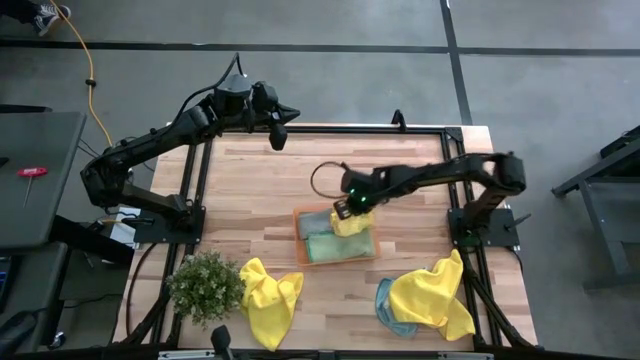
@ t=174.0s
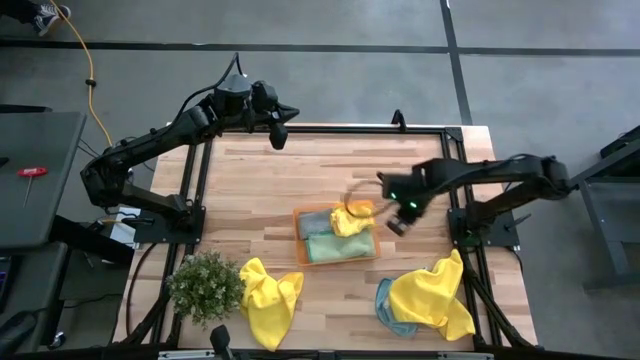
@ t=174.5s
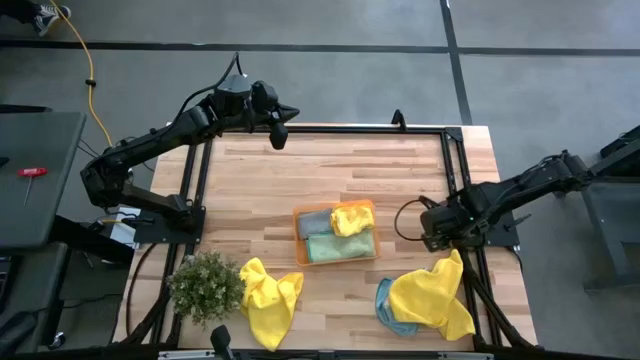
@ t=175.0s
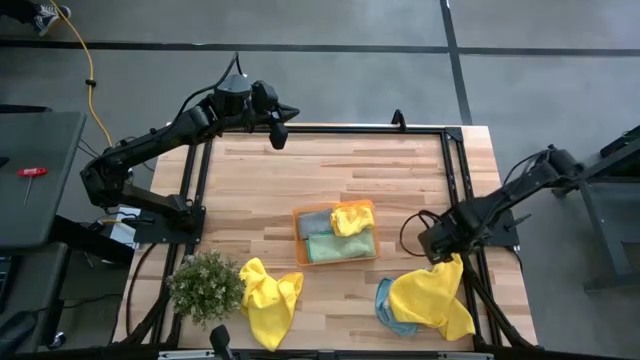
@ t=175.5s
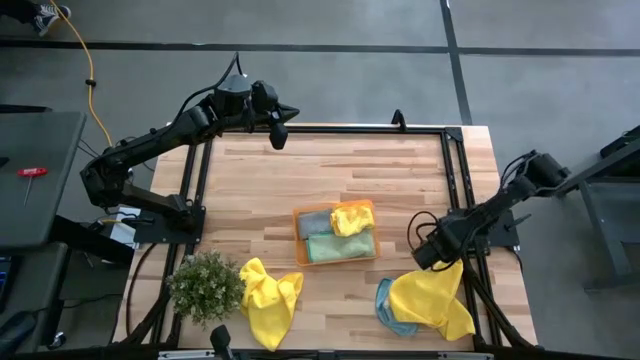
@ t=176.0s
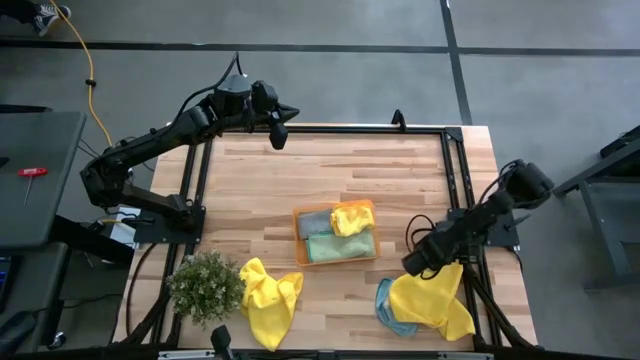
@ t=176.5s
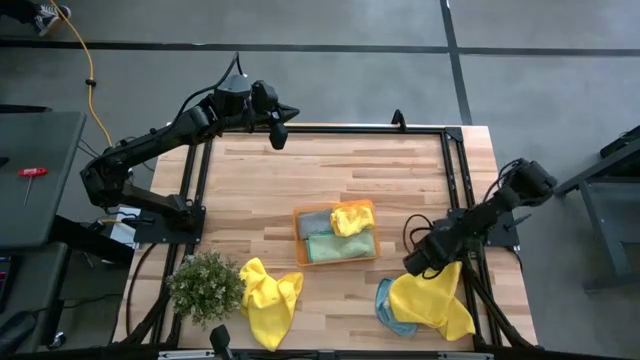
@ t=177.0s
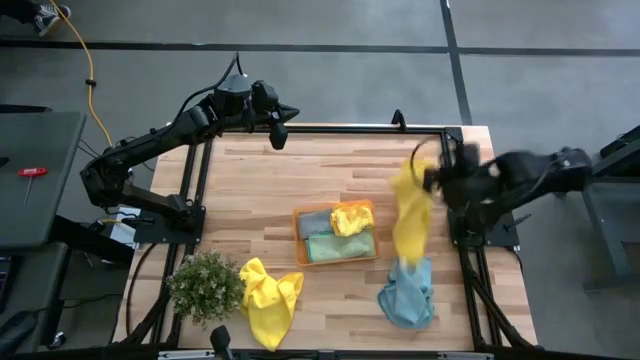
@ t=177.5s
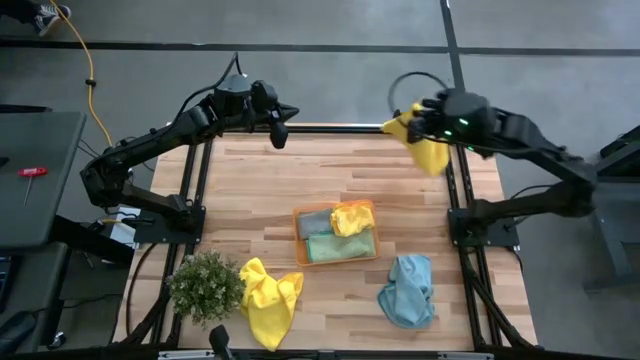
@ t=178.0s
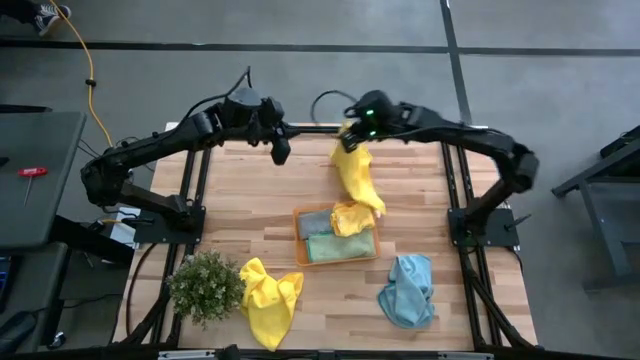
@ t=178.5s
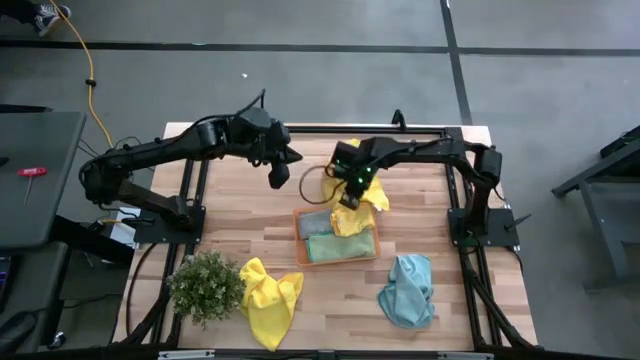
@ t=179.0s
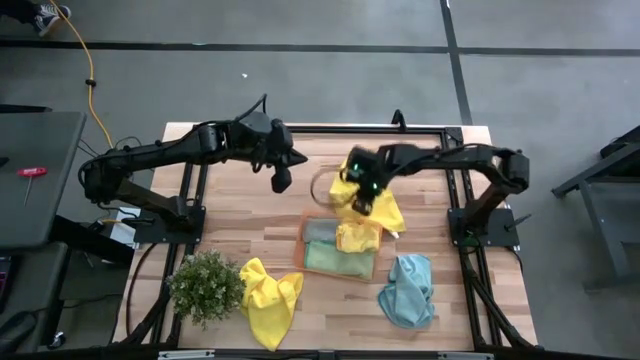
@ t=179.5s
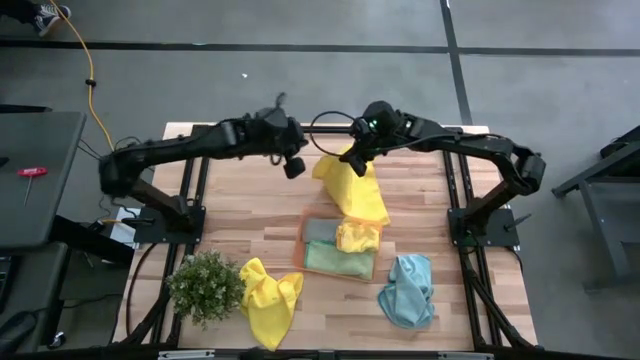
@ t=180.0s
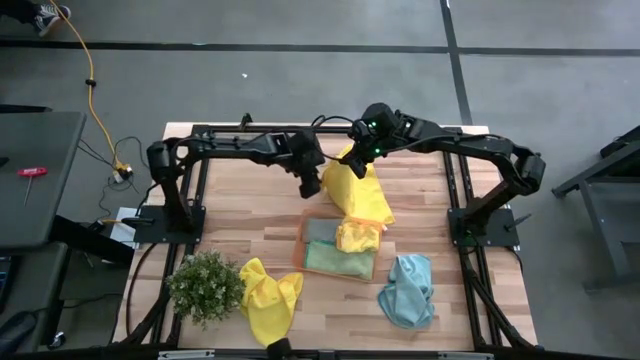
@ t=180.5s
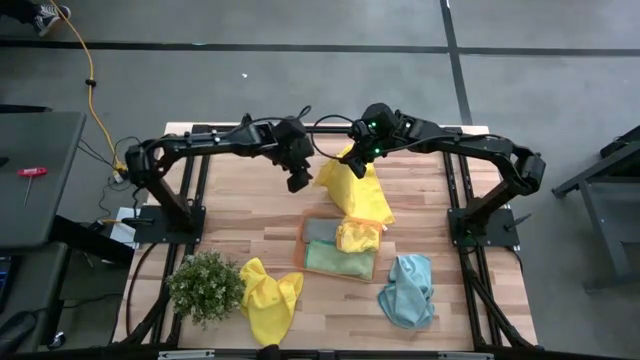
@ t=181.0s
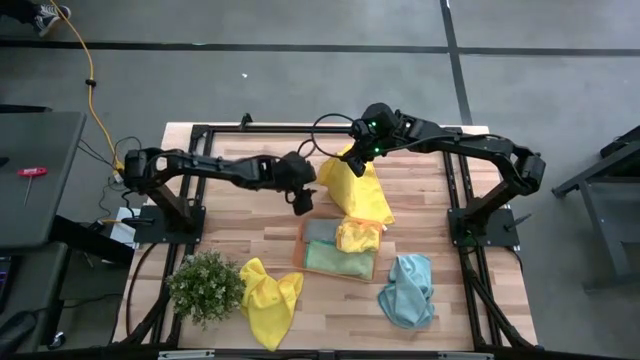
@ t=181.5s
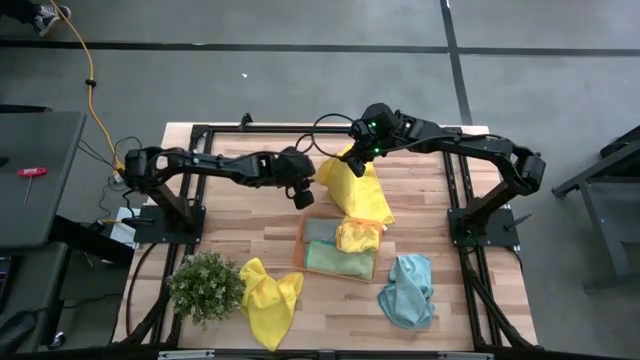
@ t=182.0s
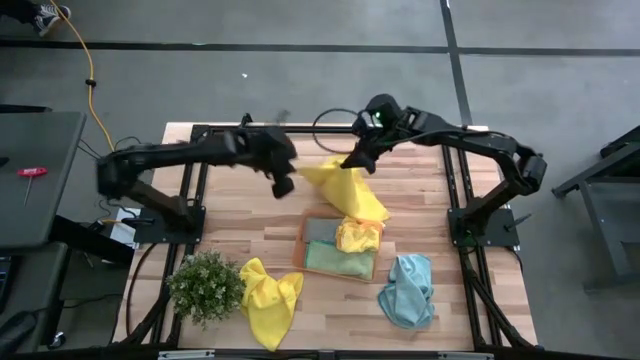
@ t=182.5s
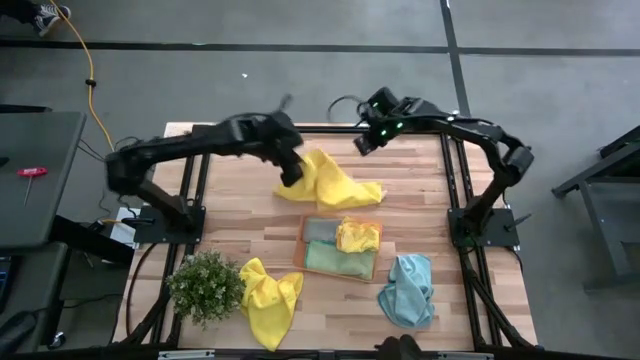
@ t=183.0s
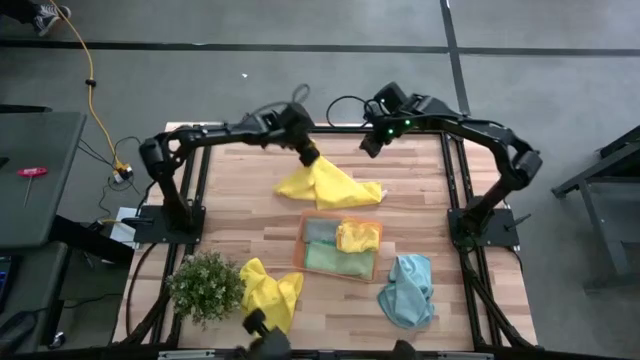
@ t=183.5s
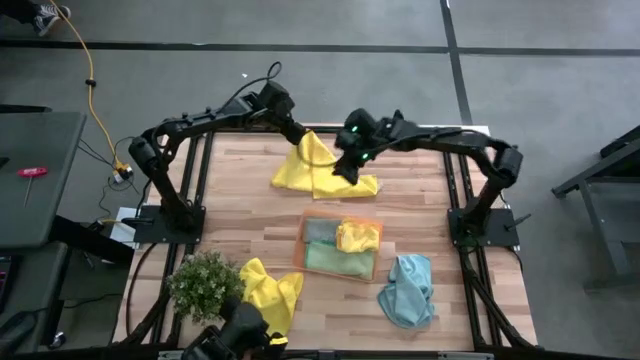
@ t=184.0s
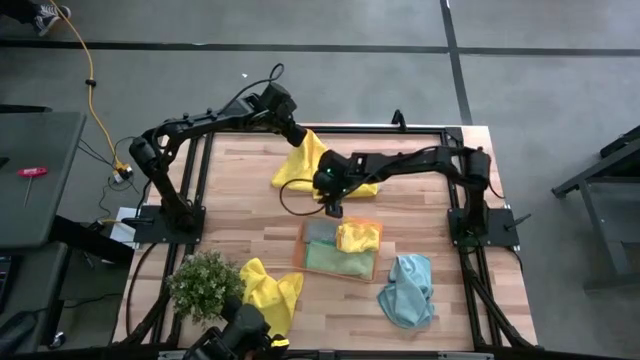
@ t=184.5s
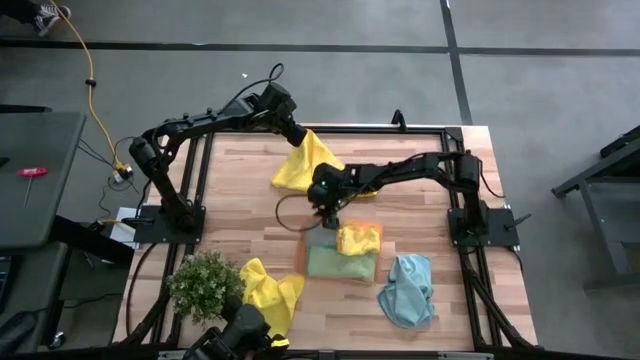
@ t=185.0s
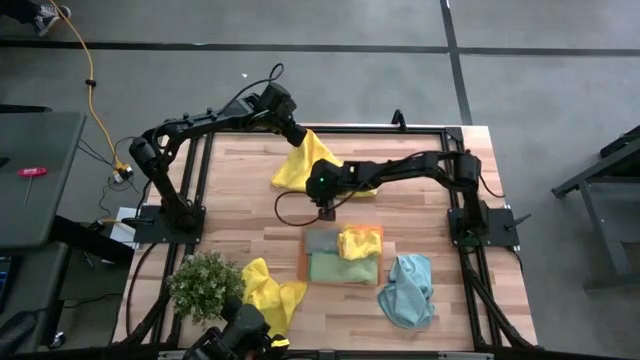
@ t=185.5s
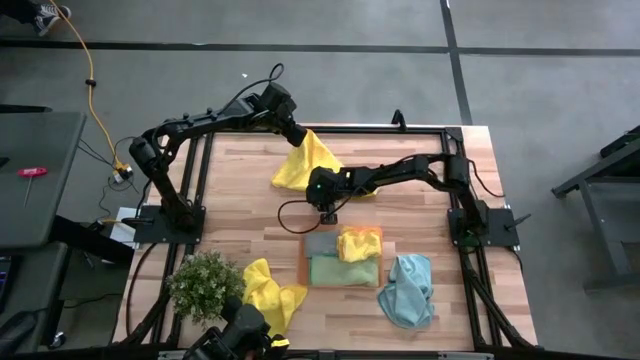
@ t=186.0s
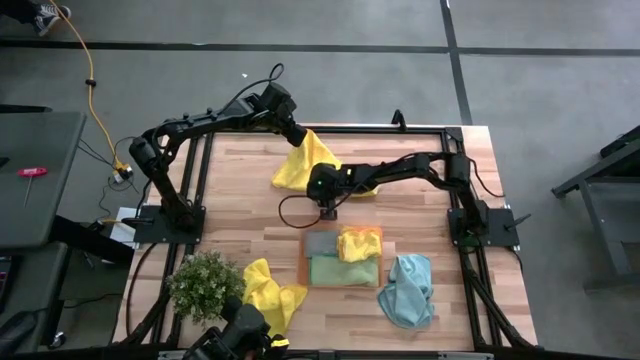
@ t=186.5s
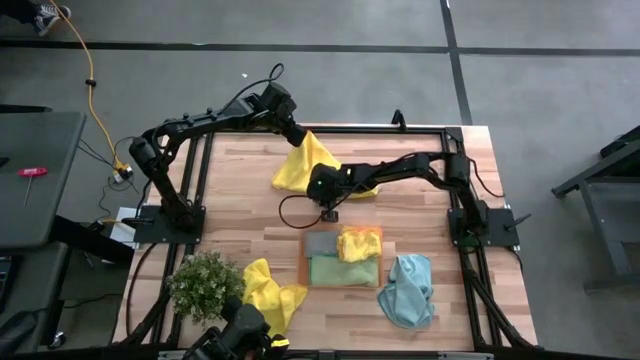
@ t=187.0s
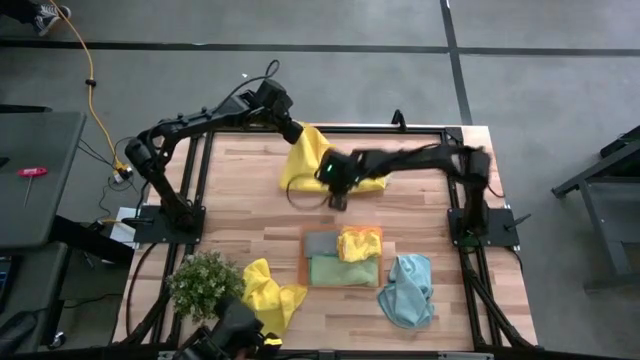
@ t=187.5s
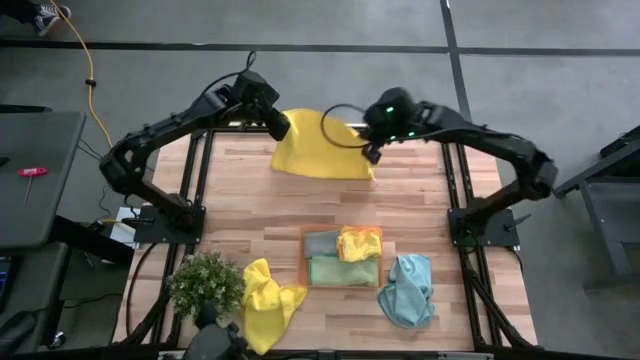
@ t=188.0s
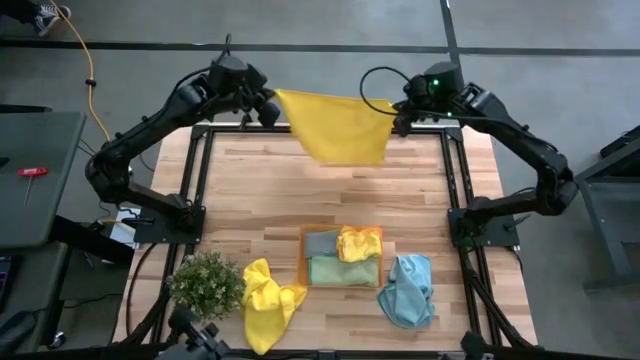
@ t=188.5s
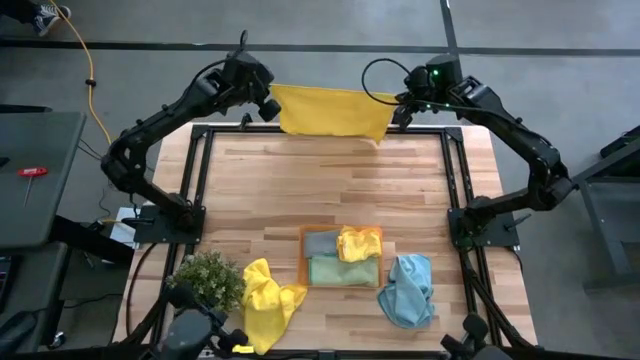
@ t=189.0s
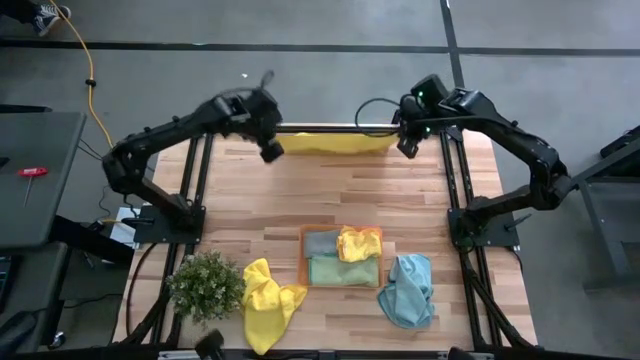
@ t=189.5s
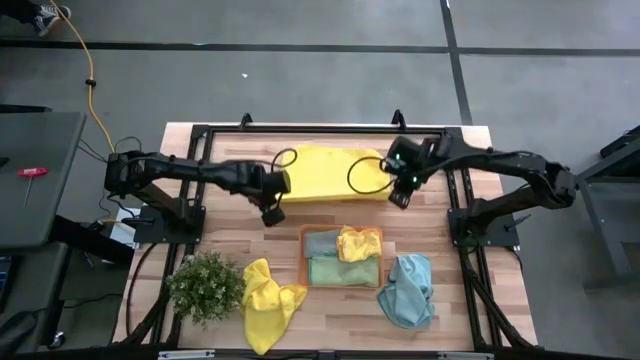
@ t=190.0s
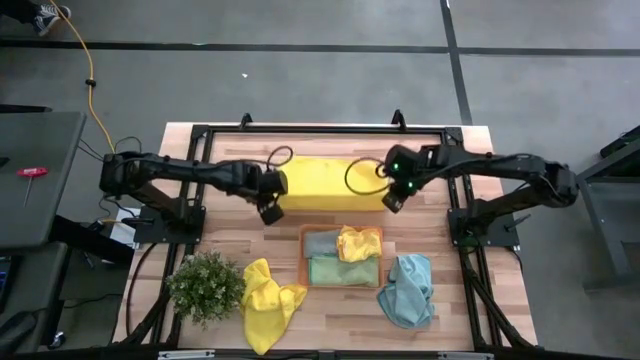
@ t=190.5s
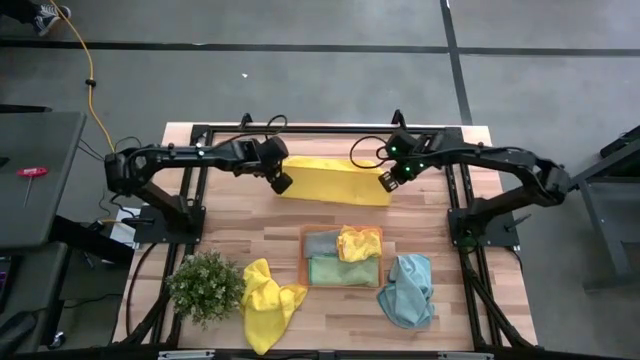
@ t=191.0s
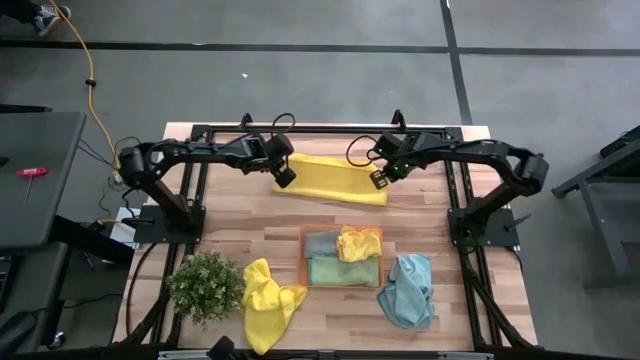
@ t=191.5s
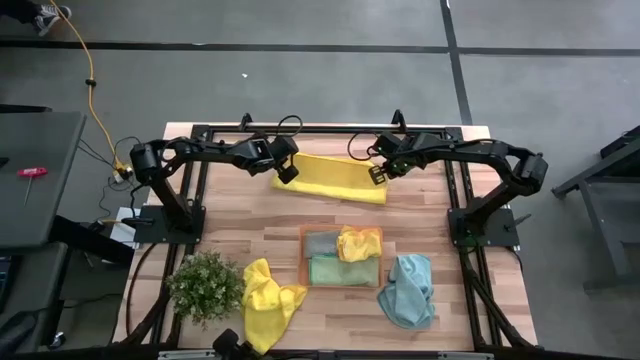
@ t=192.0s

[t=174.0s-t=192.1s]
Task: Fold microfiber towels
Fold the right yellow microfiber towel

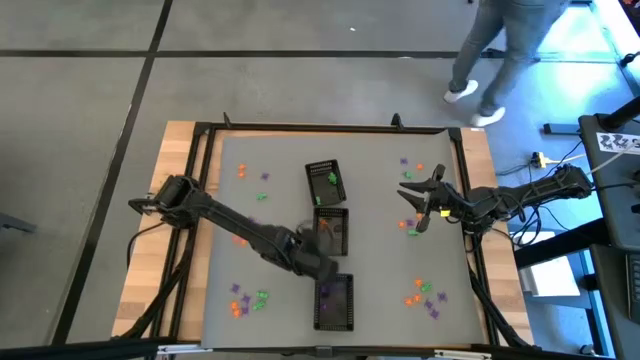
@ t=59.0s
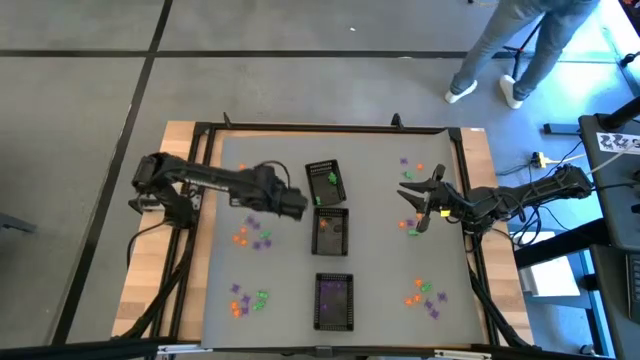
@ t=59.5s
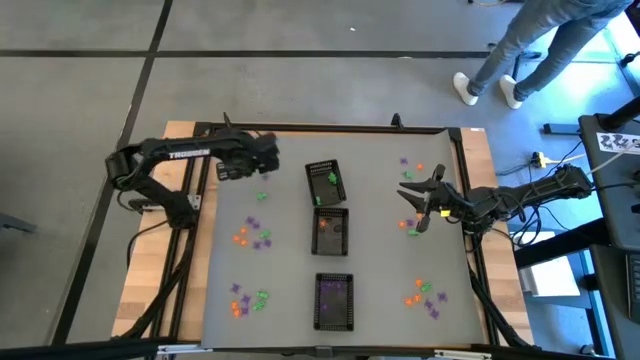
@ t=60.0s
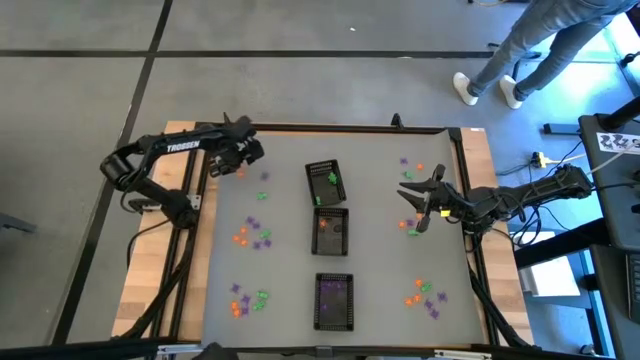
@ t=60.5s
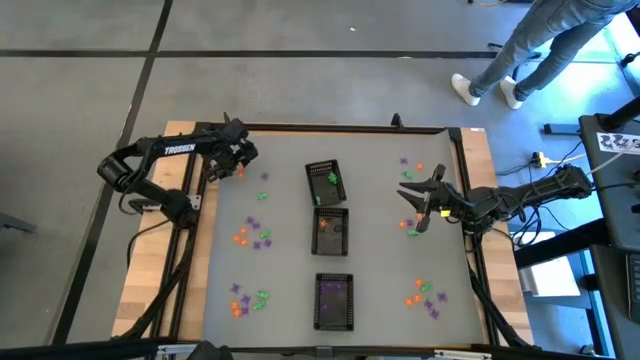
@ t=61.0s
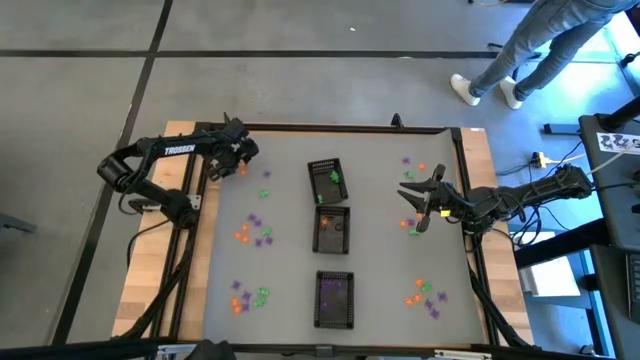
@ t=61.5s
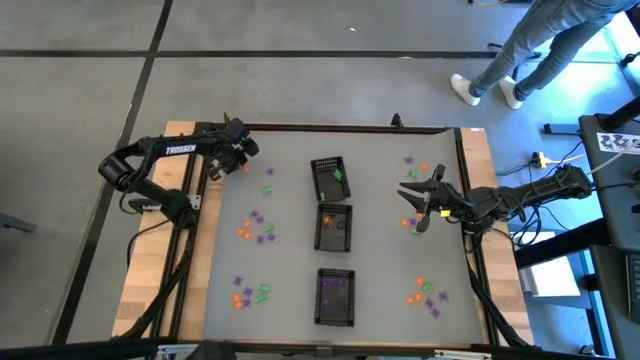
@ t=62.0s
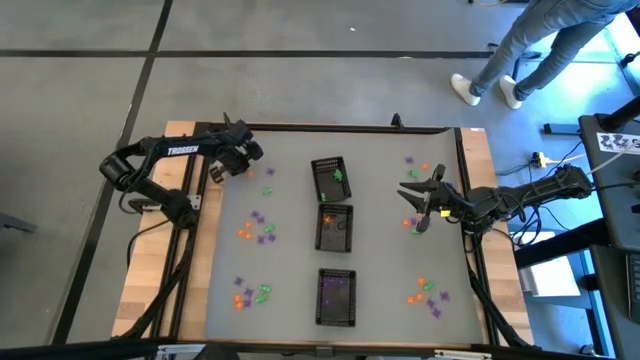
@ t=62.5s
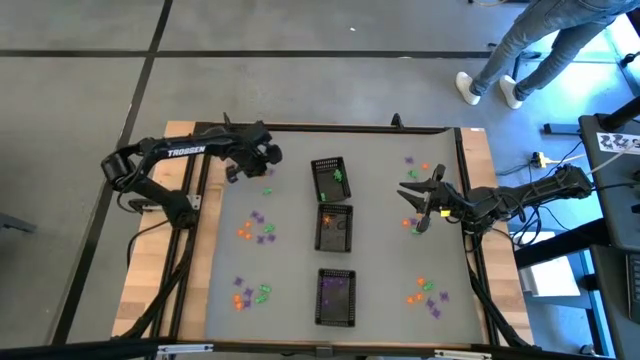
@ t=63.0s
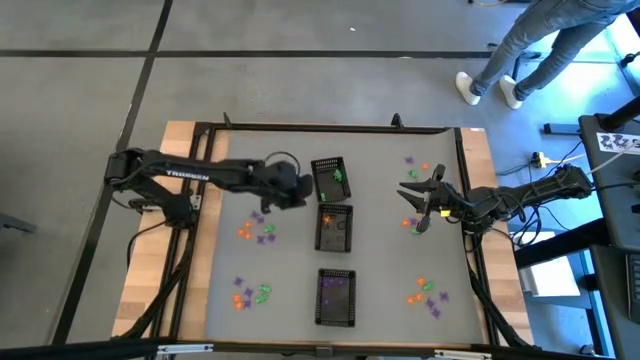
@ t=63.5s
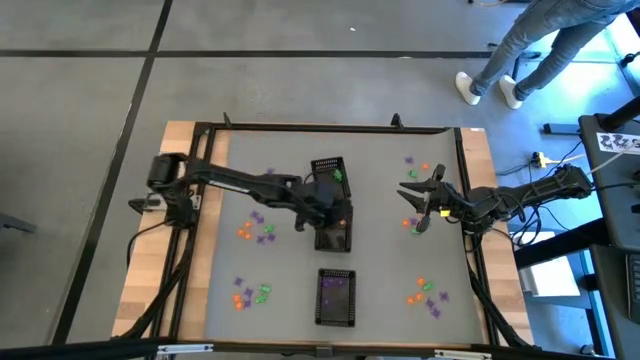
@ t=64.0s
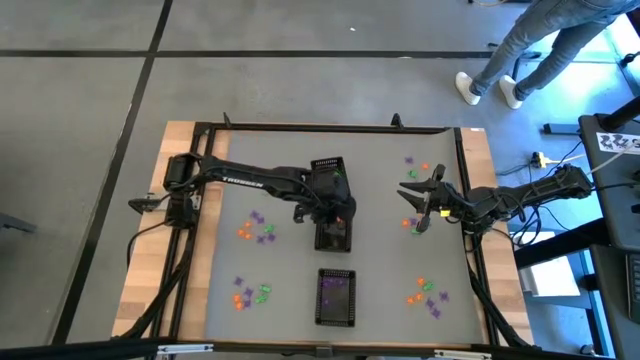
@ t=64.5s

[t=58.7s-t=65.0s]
Task: Sort Halloween decoration
Put the orange spider toy into the middle black bin
